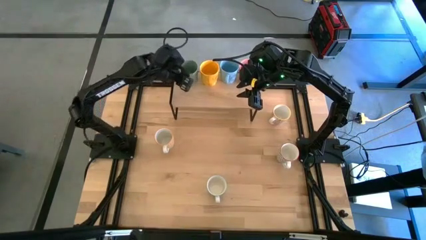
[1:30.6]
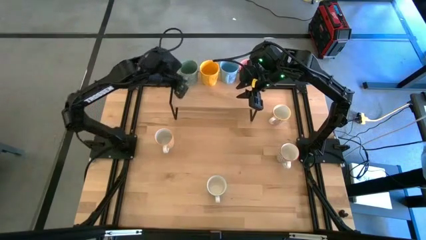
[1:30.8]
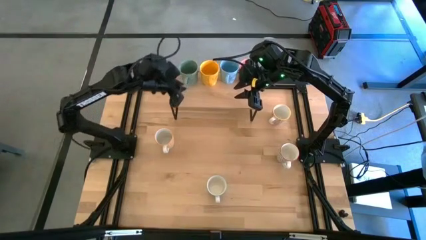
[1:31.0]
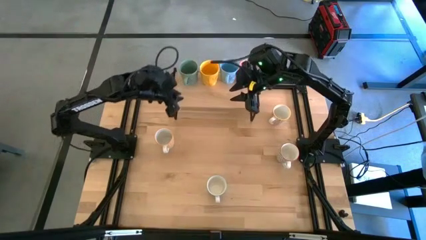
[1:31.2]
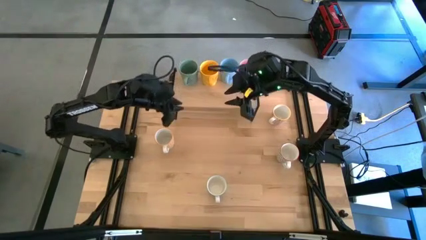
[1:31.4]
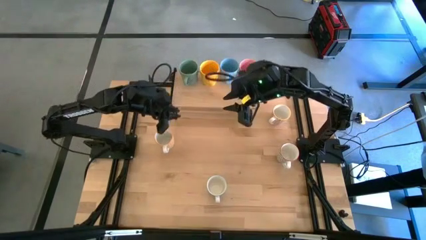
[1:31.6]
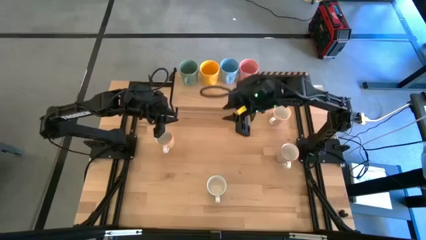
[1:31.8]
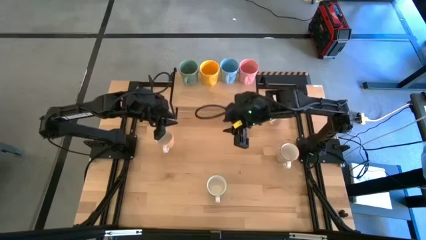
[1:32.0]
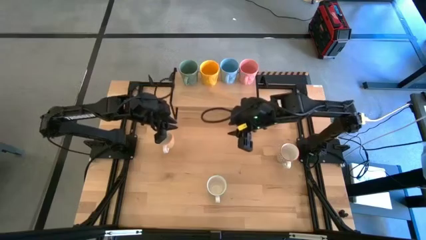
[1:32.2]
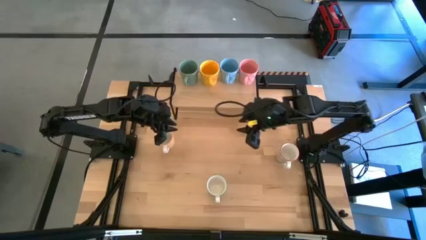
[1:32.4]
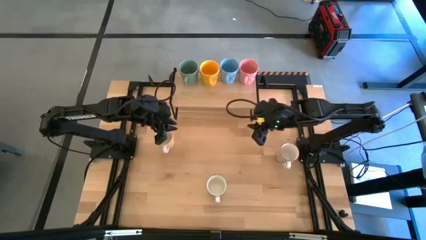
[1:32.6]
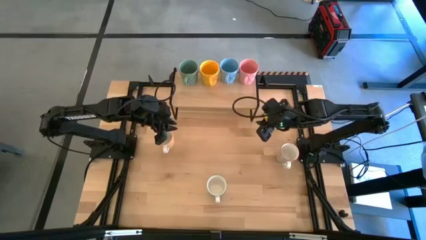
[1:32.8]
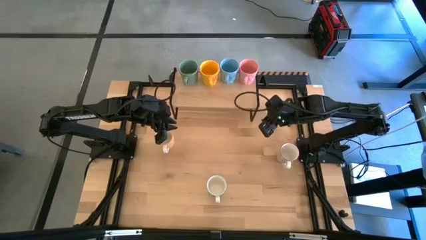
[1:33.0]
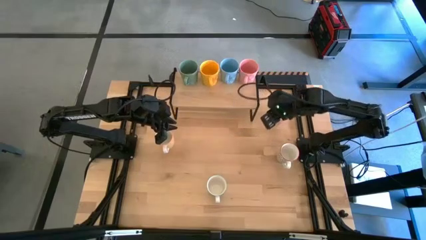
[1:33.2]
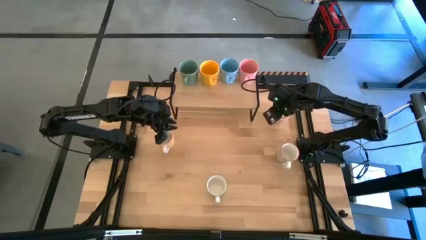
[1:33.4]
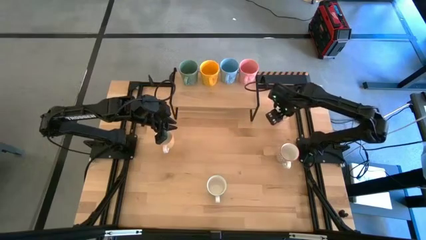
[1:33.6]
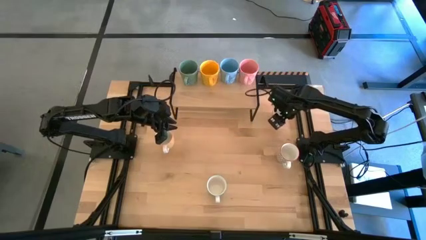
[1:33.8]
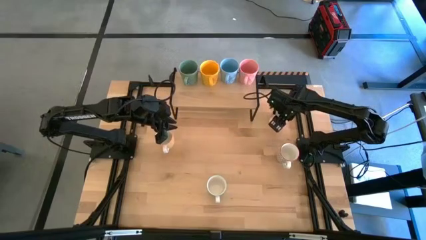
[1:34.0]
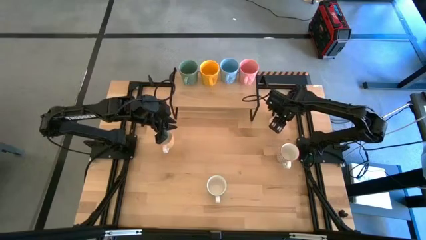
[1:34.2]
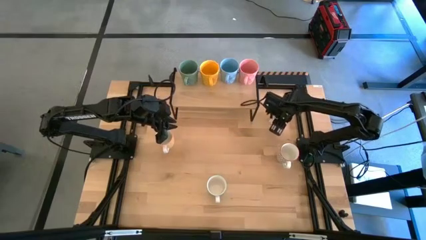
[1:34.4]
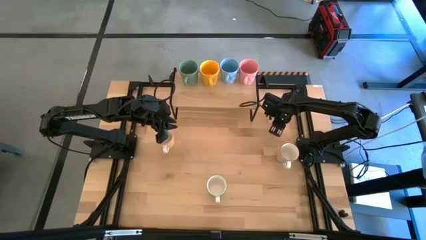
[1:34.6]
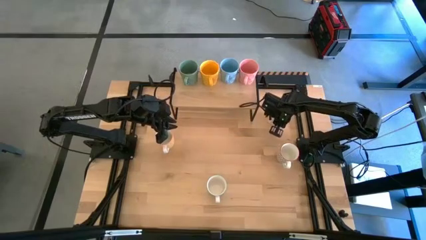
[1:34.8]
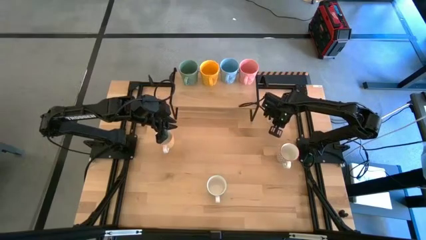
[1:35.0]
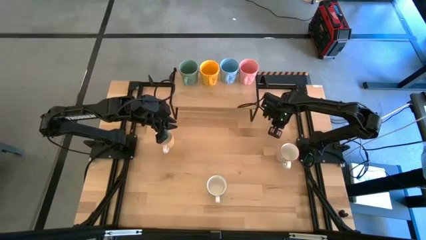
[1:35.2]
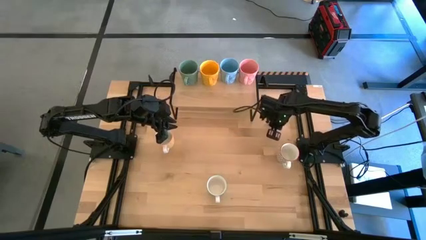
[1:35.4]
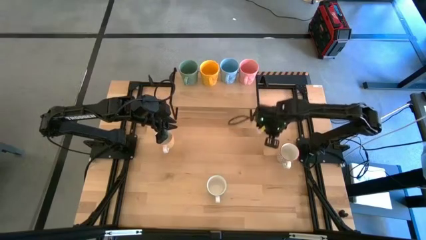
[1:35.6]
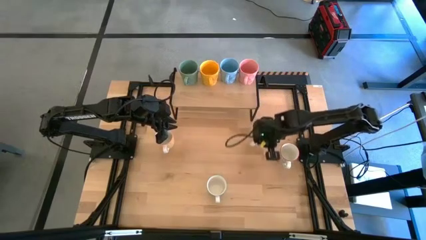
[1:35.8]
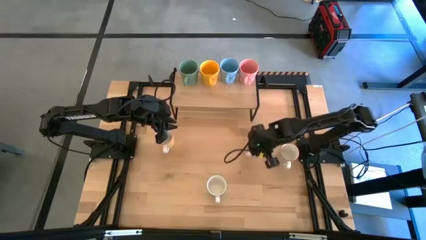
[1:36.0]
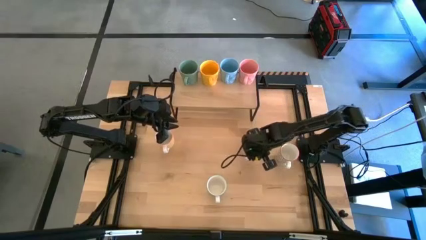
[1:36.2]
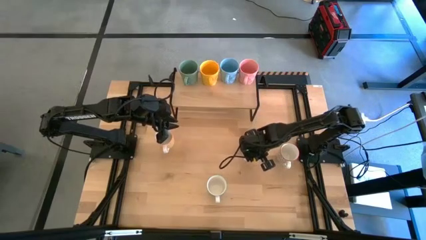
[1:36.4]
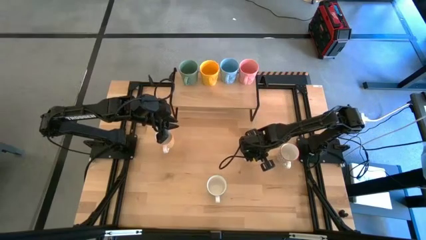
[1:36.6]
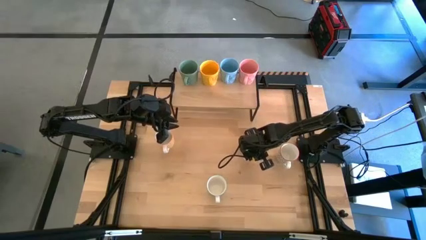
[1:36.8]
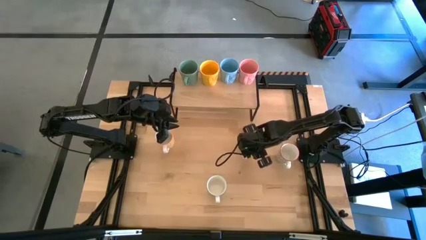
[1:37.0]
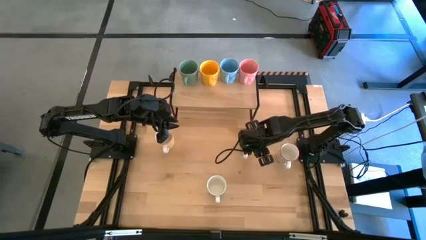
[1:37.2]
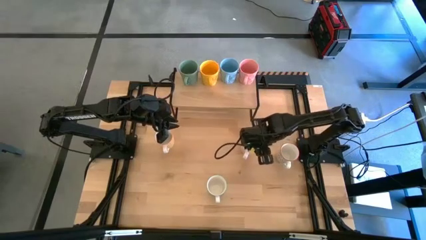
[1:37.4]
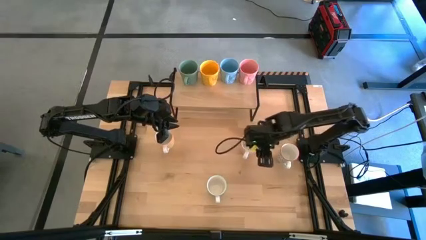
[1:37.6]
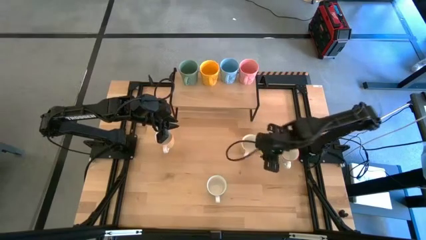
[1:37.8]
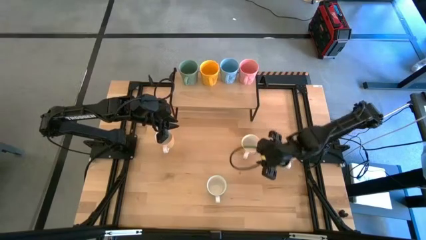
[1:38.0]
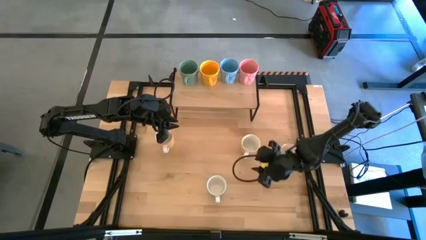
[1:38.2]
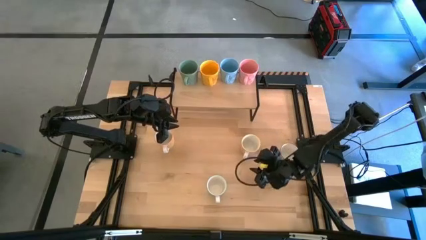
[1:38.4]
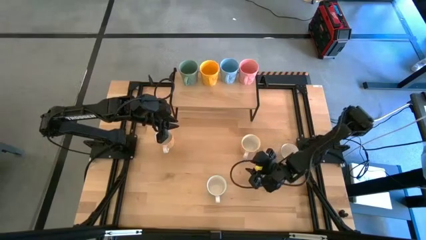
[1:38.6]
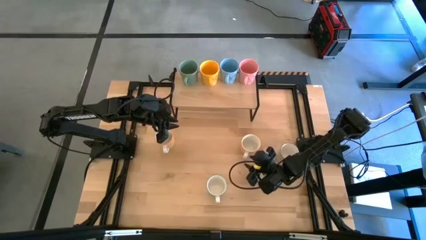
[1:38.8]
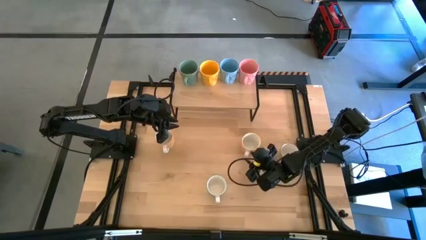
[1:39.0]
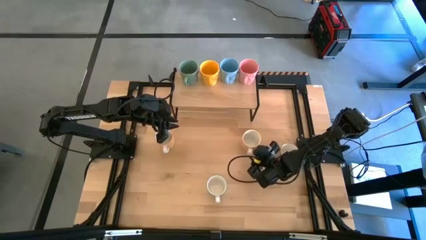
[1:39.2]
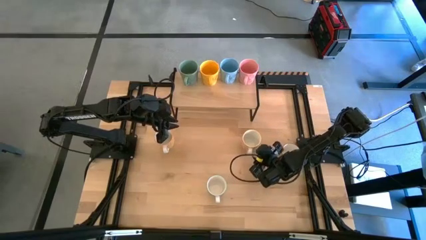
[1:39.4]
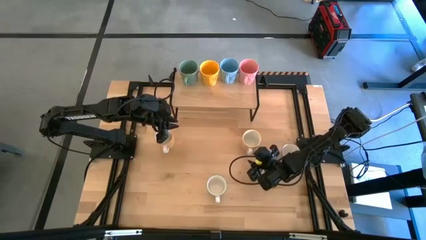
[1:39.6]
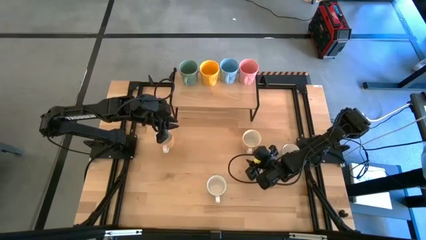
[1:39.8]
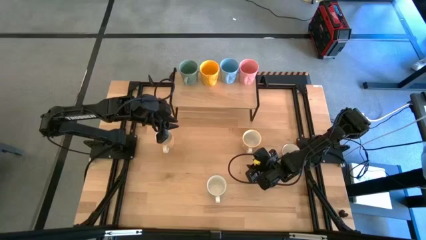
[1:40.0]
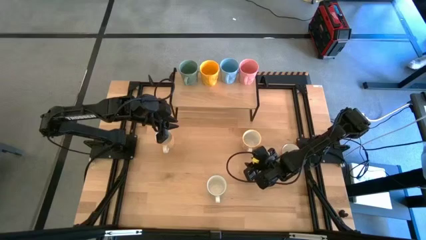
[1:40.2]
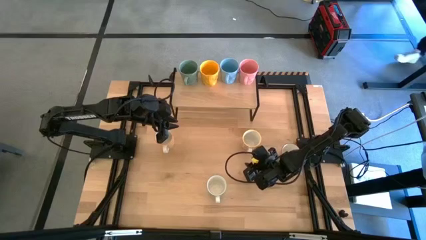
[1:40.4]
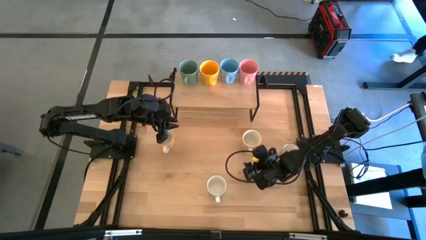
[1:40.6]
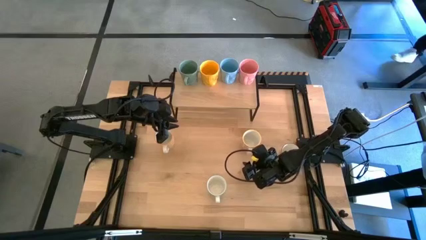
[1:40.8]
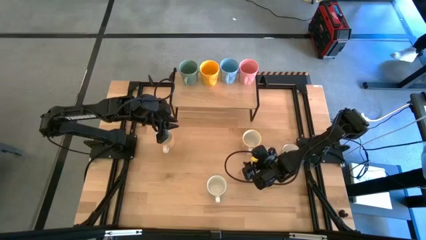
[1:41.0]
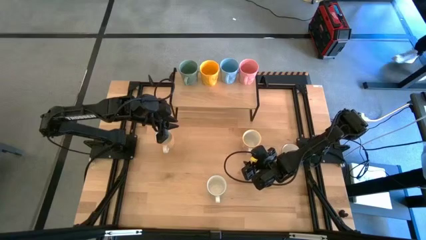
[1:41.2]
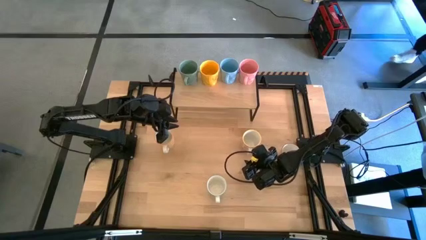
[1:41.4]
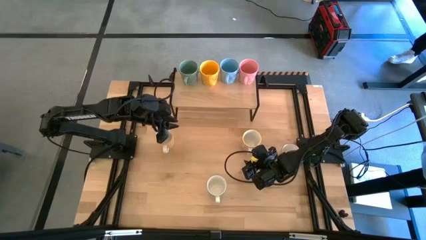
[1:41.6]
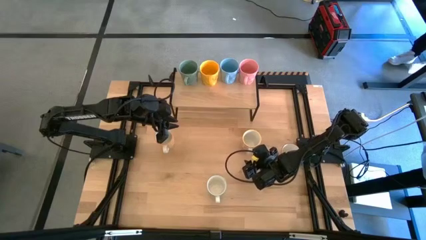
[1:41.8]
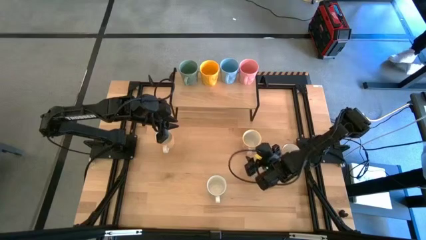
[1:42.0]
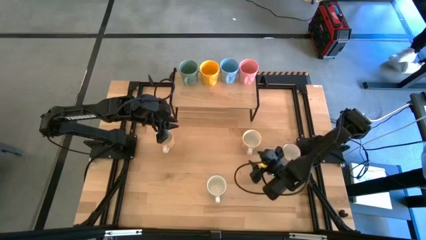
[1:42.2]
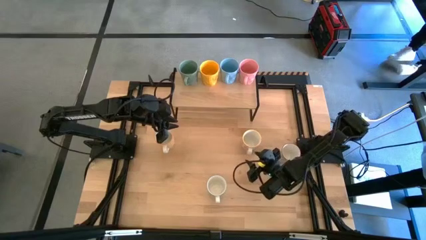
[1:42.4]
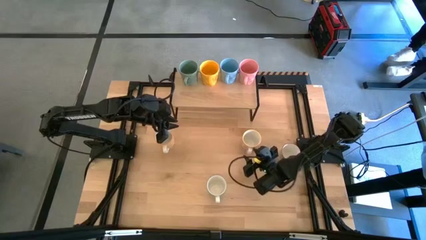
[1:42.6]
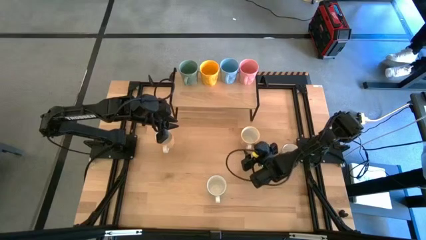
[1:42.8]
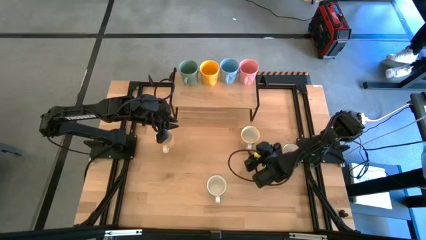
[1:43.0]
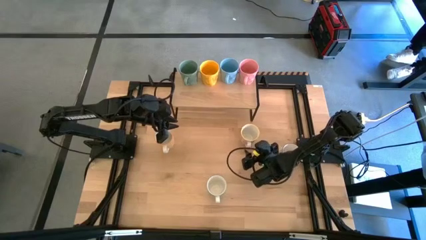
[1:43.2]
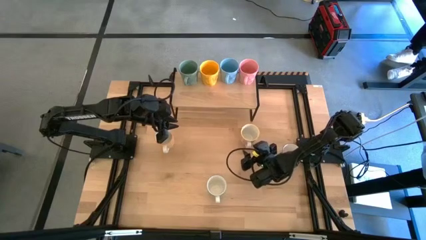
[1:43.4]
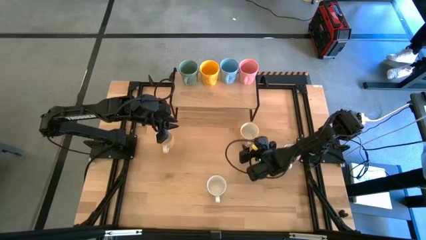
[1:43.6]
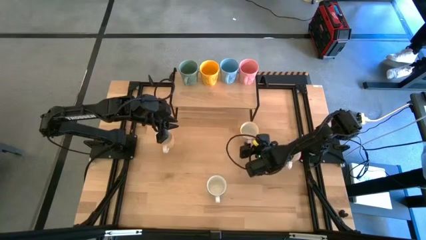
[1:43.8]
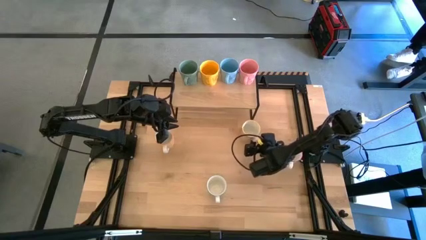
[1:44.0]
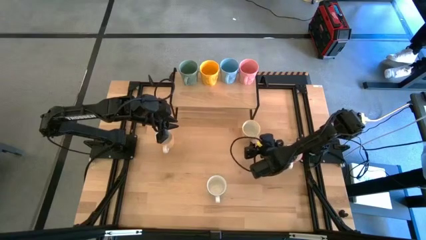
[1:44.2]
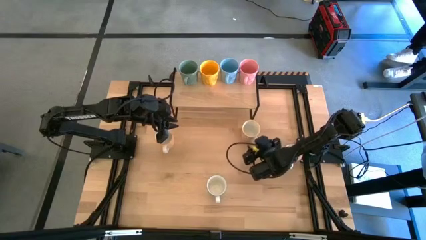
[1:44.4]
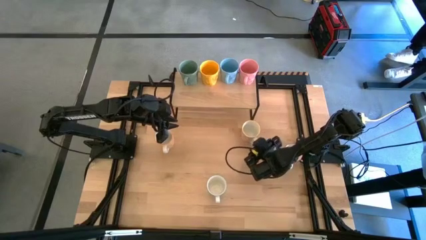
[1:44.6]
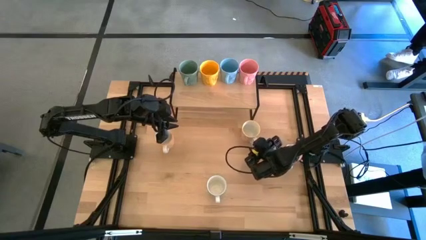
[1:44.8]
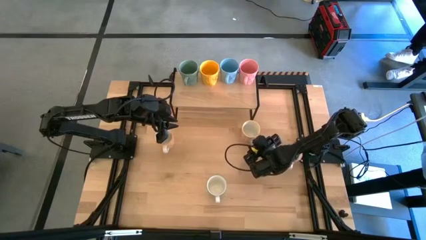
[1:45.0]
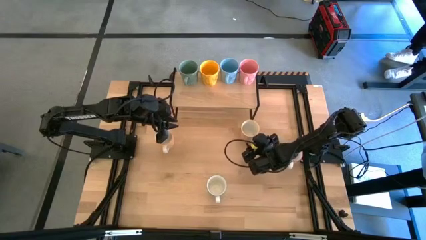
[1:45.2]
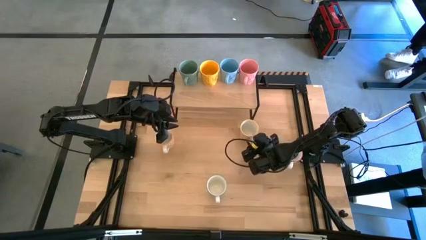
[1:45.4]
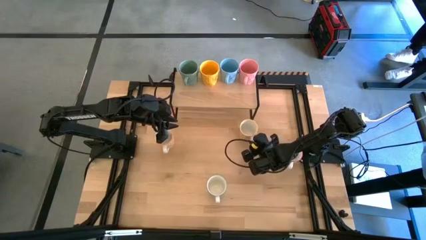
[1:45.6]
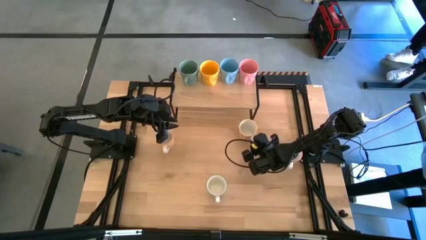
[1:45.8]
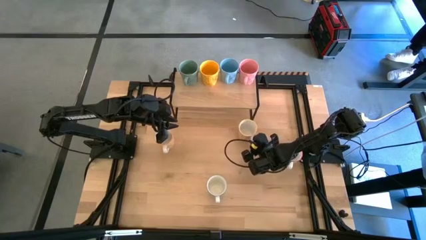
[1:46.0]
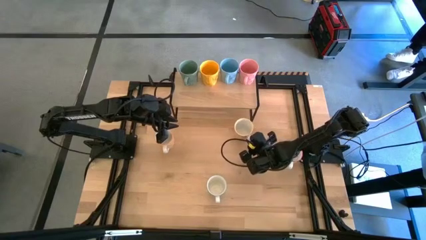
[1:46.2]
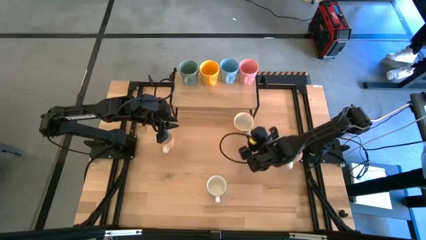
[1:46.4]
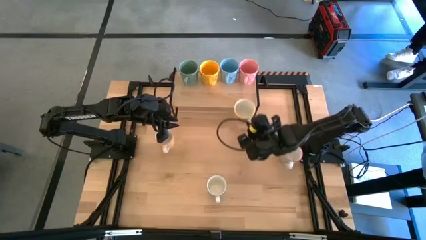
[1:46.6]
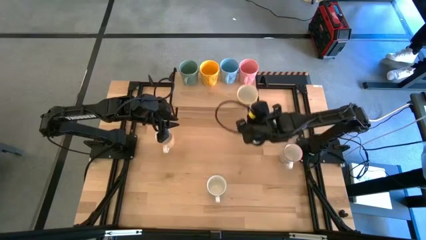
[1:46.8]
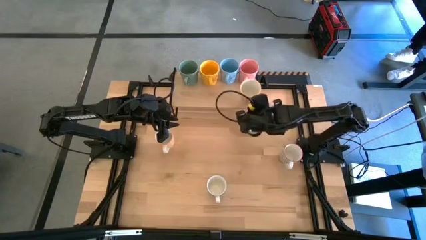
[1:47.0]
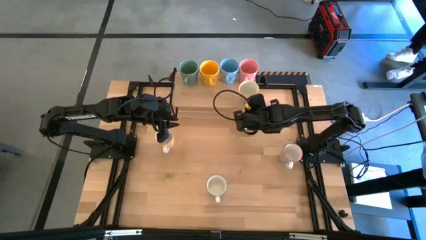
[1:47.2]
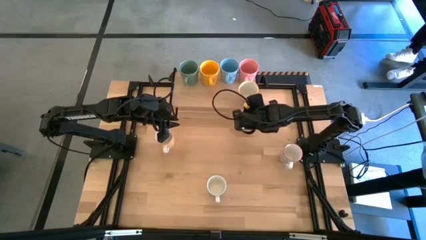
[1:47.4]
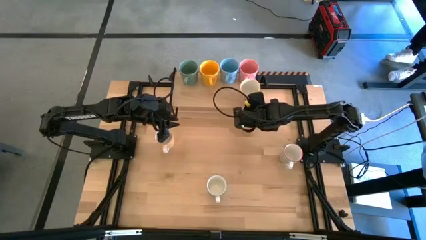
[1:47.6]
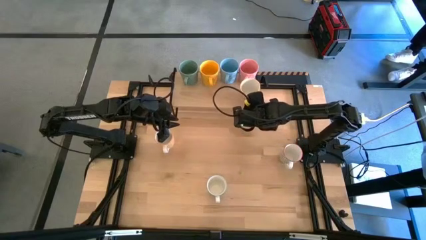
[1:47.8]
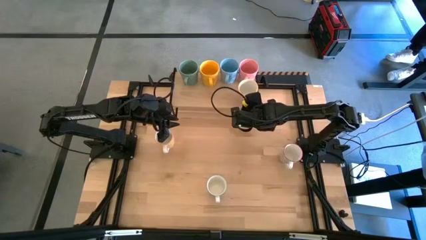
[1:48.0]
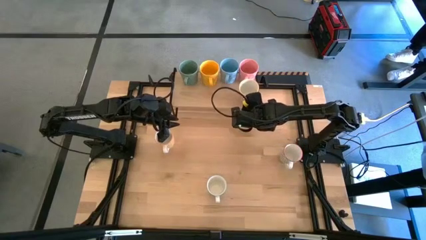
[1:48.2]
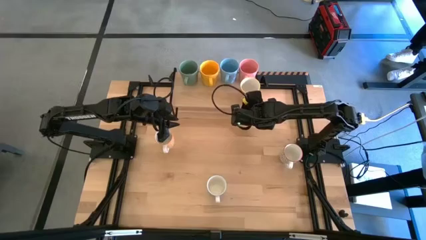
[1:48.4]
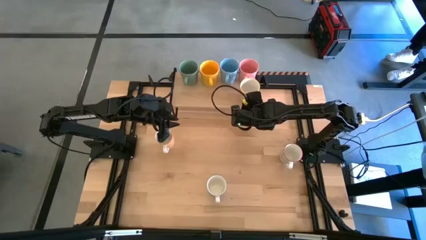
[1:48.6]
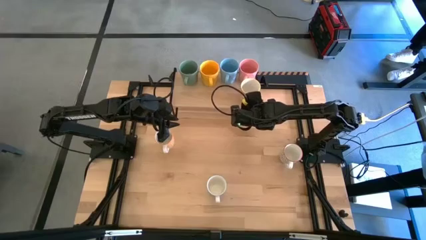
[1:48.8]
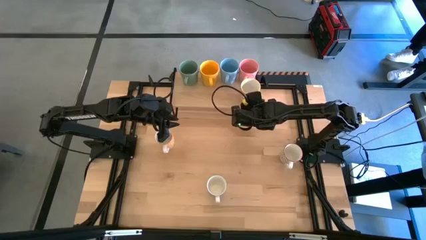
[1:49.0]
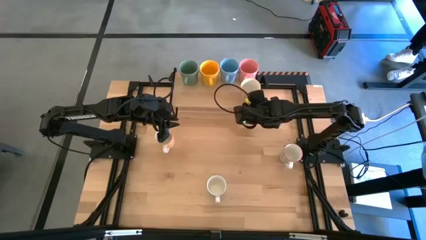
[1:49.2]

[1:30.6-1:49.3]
Task: Place coffee mugs
Put the red patterned mug on the shelf
